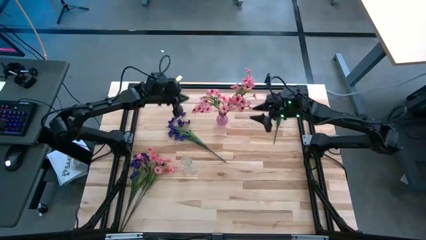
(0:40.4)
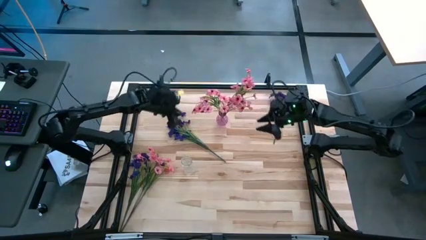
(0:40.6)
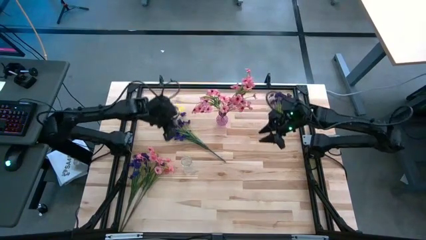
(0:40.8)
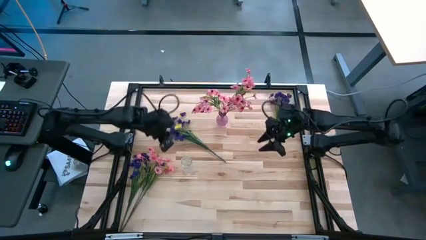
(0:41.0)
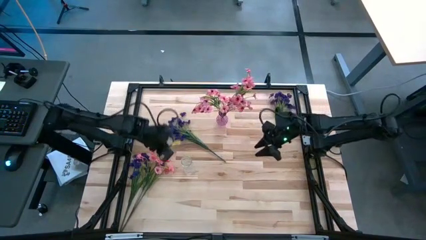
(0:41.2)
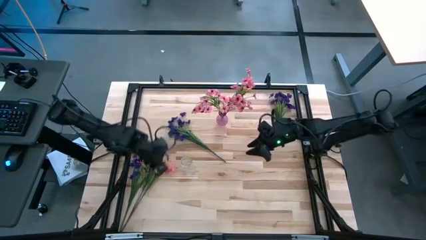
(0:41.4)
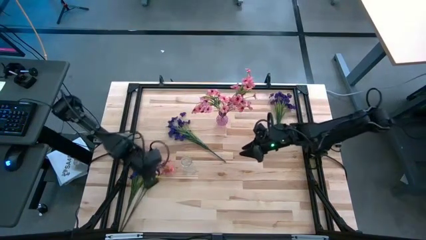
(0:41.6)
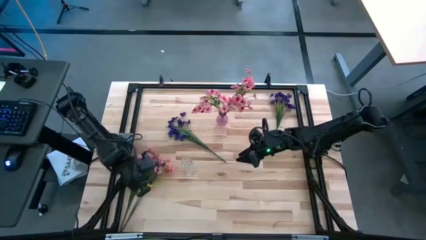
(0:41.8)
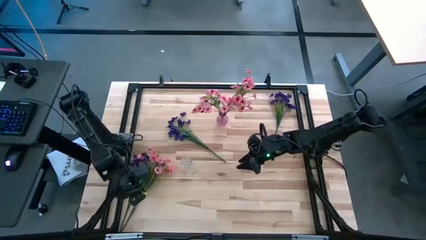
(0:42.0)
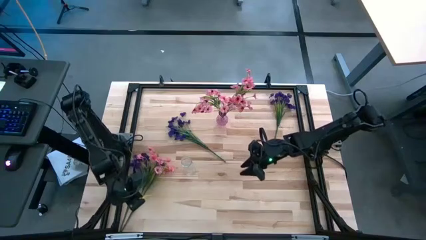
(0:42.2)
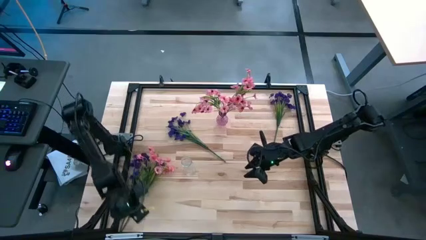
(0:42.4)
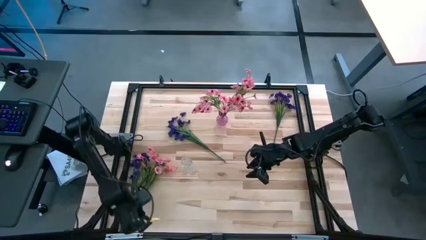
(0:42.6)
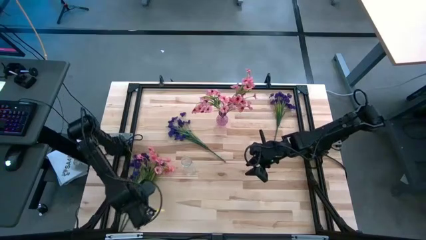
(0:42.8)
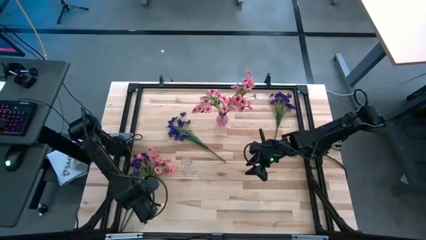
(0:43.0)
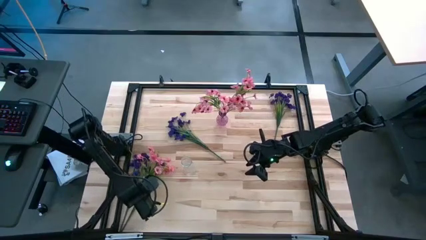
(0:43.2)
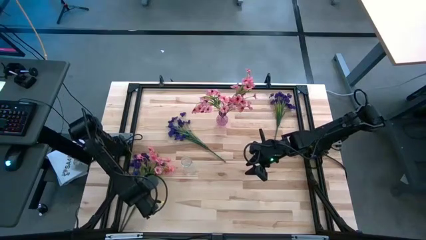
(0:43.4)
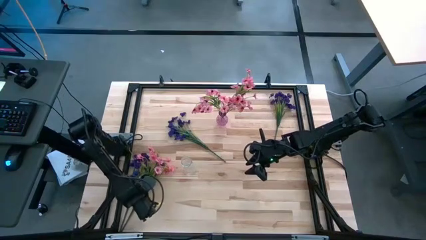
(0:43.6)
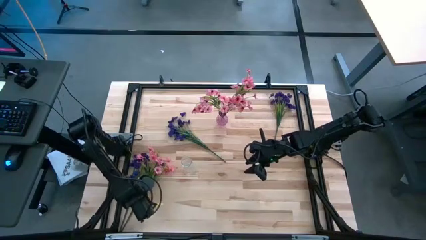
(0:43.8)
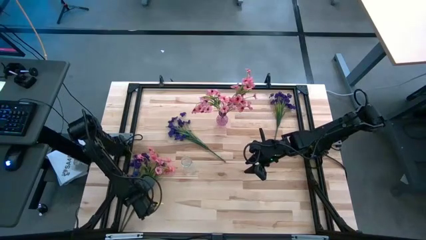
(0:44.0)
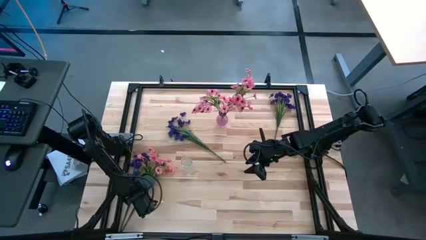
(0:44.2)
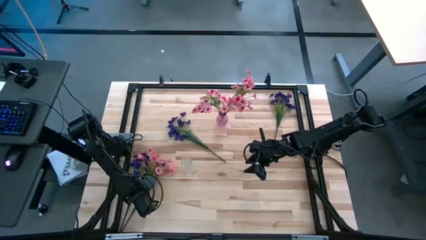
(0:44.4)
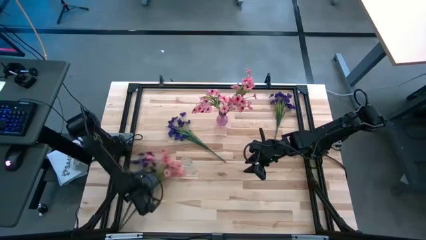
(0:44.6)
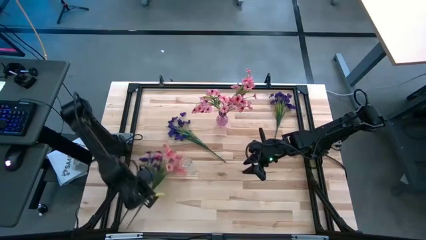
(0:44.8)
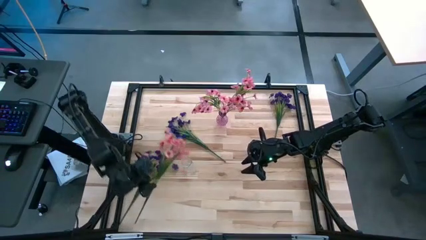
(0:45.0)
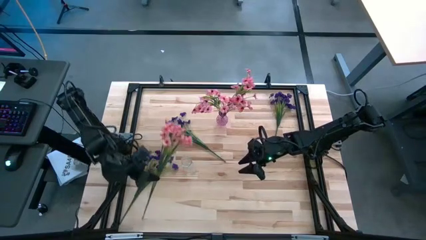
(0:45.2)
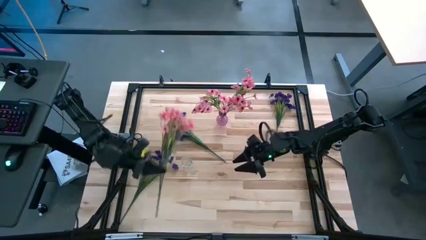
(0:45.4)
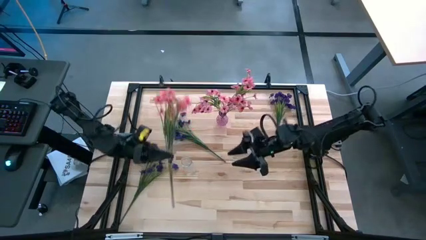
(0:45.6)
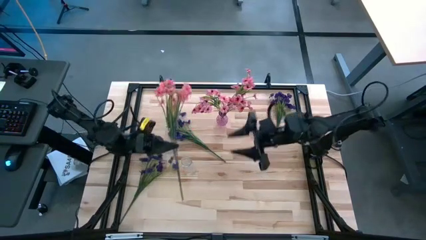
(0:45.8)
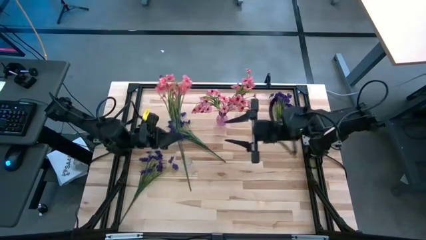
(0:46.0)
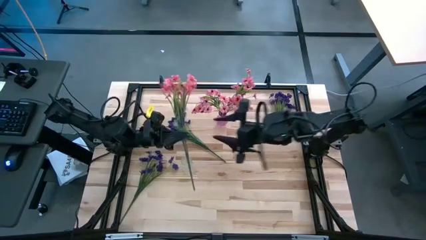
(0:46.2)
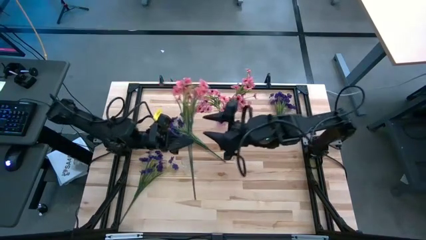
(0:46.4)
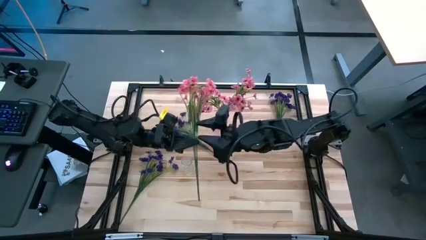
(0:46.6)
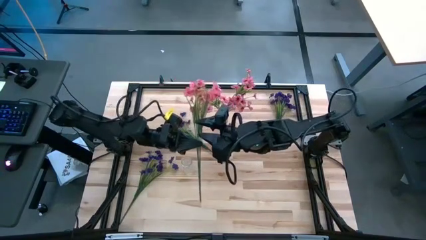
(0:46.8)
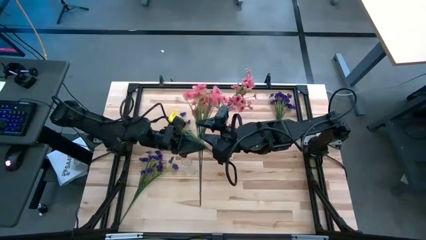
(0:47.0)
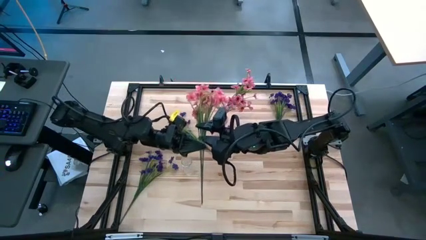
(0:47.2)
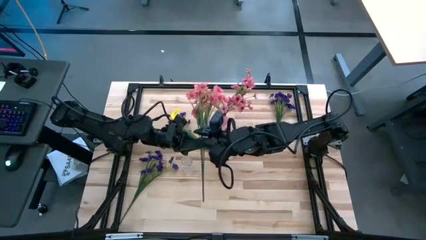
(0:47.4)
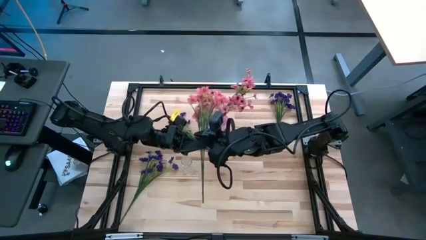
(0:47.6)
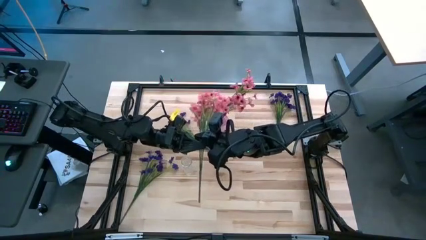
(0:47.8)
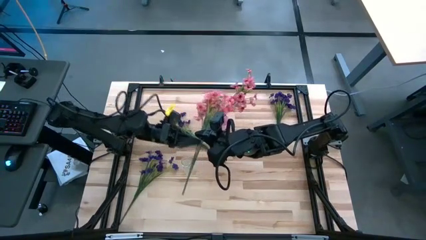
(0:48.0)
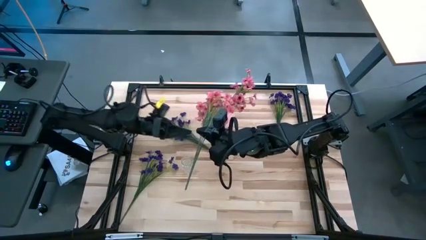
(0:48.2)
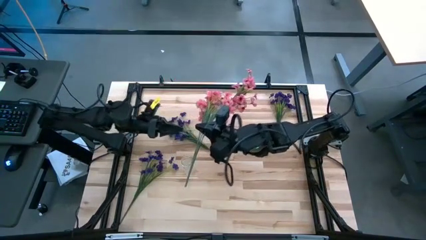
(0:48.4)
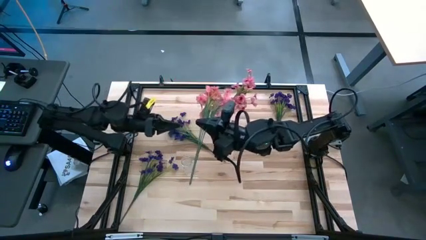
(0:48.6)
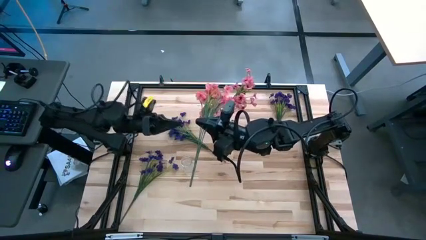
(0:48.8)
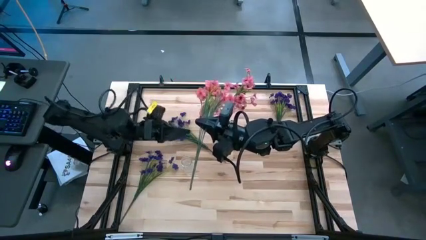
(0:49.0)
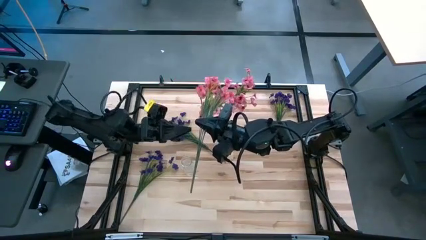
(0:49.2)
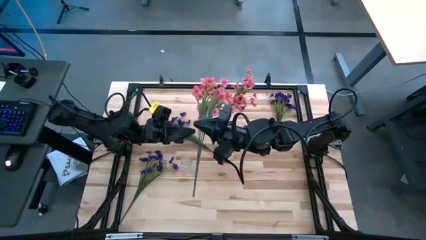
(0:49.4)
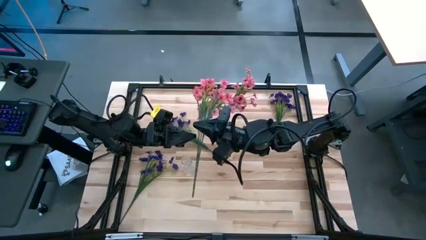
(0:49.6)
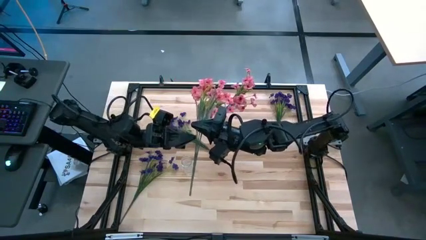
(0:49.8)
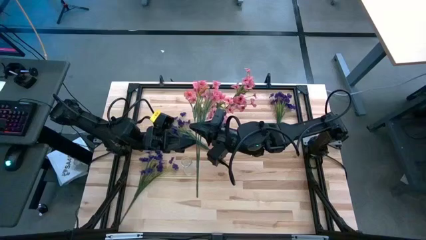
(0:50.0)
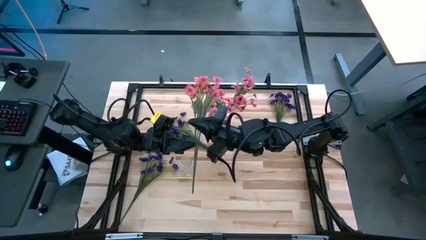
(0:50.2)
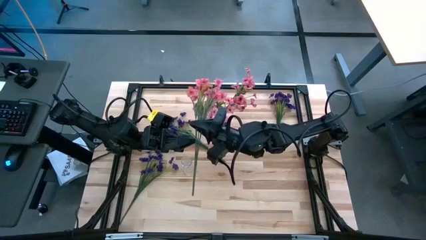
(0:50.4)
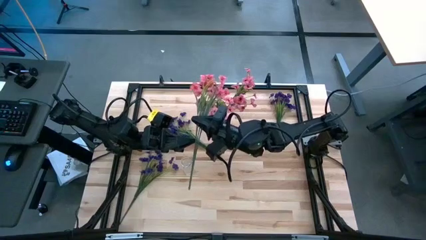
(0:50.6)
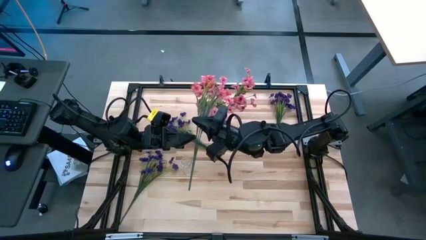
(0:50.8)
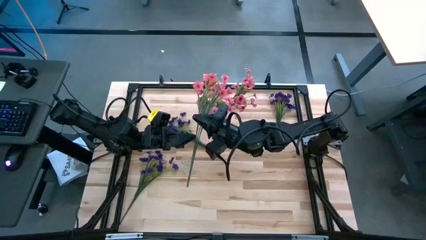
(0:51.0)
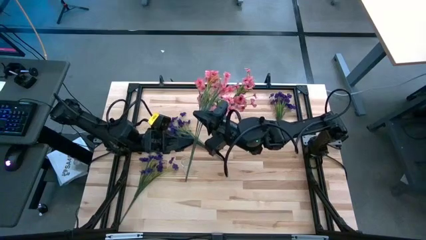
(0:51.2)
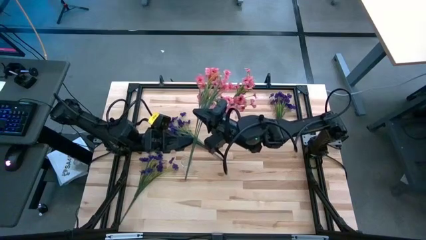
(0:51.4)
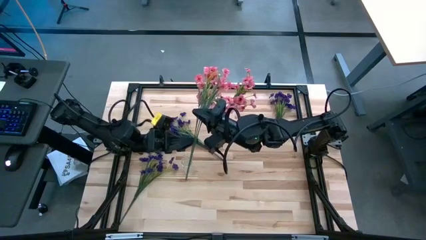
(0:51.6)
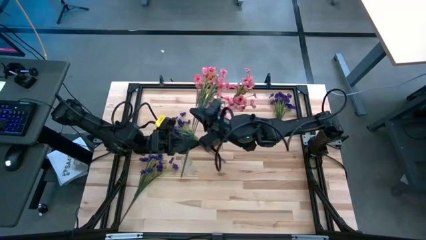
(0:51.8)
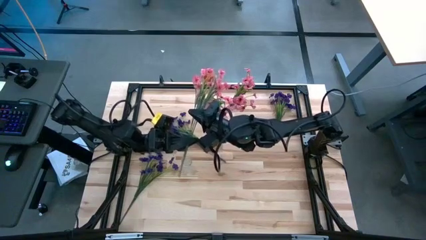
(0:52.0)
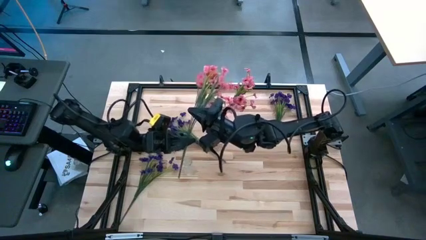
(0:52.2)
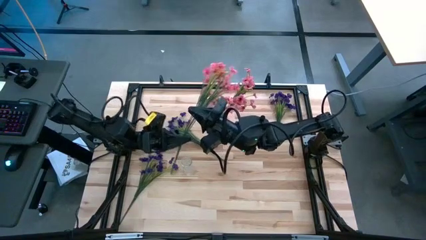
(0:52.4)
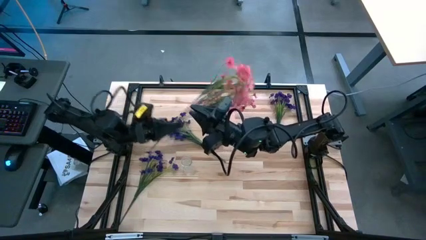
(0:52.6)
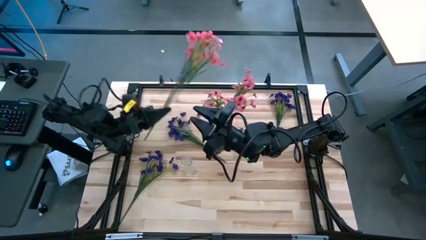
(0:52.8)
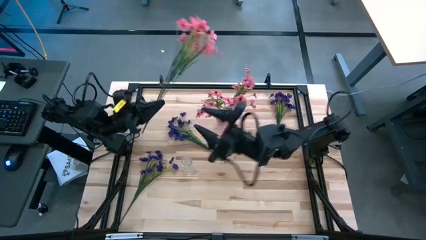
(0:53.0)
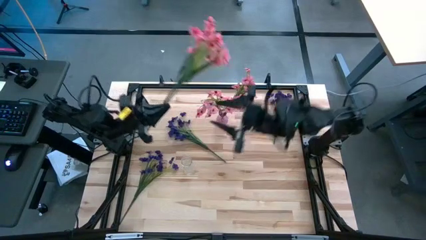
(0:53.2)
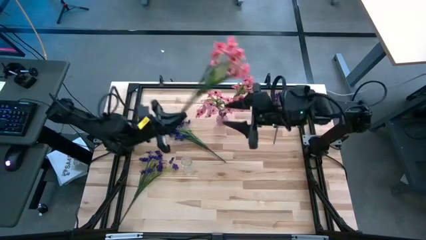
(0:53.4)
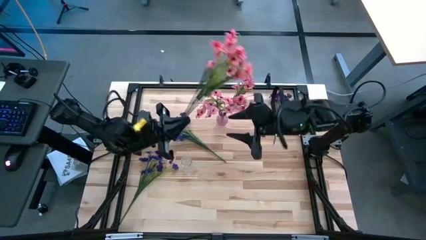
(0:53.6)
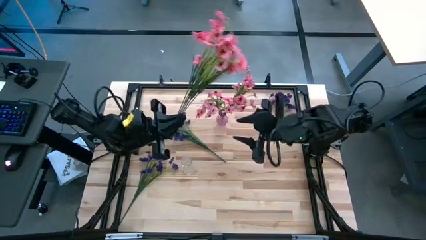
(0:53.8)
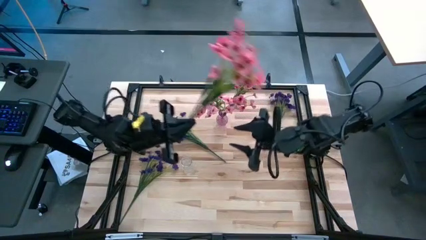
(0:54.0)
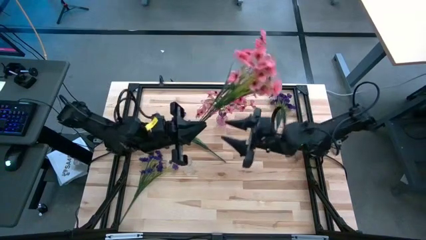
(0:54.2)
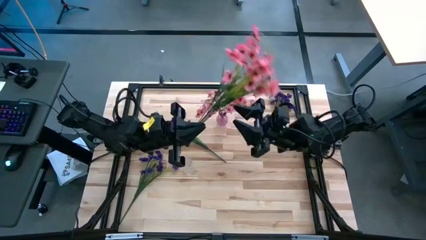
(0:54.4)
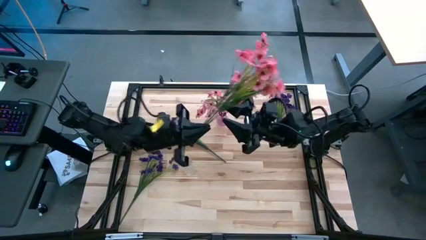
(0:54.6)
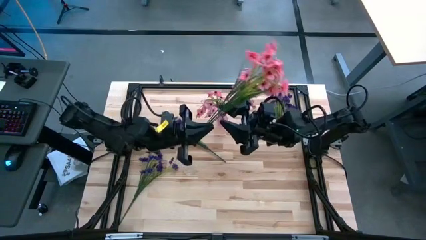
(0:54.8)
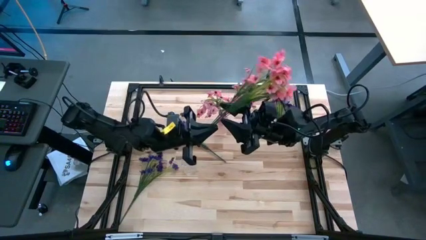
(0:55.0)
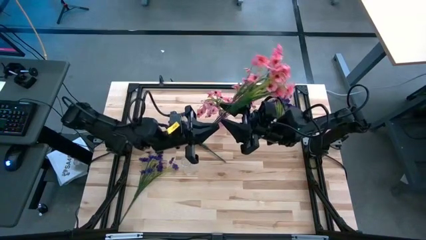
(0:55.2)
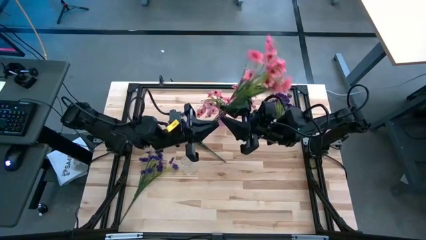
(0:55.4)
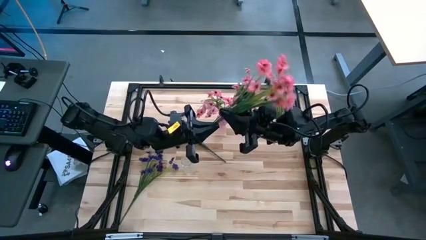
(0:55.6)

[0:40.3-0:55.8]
Task: Sort flowers into vase by color
Put the pink flowers into the purple vase

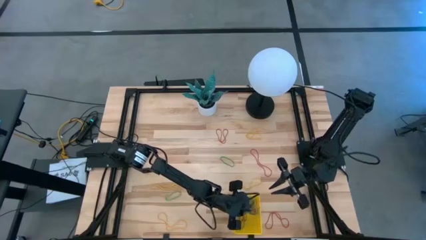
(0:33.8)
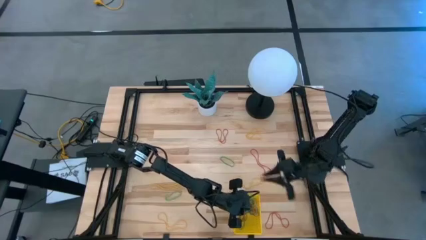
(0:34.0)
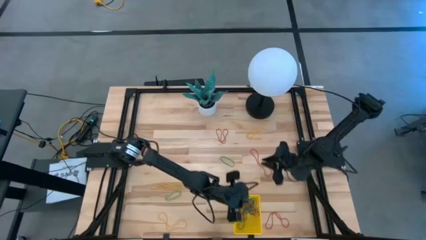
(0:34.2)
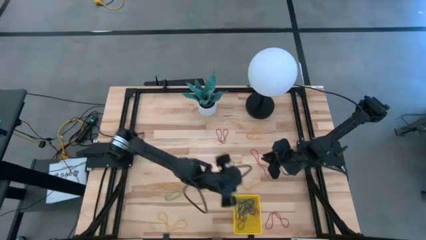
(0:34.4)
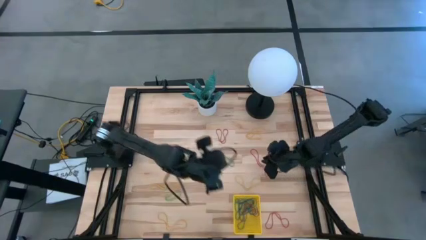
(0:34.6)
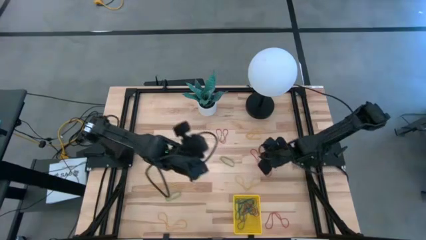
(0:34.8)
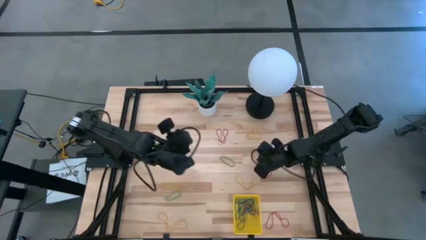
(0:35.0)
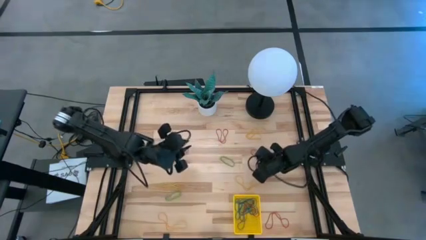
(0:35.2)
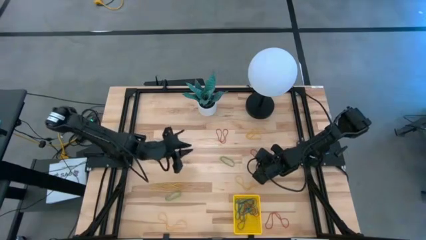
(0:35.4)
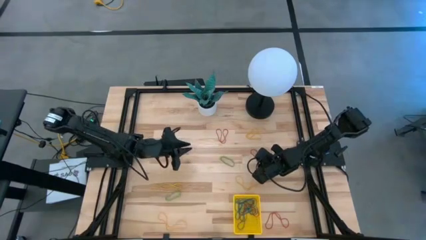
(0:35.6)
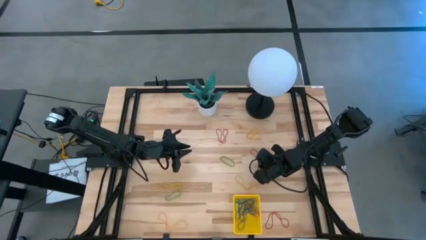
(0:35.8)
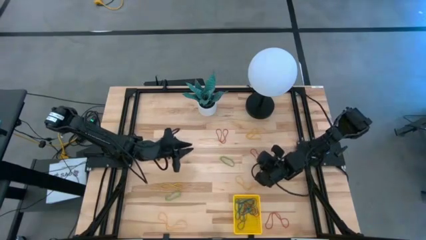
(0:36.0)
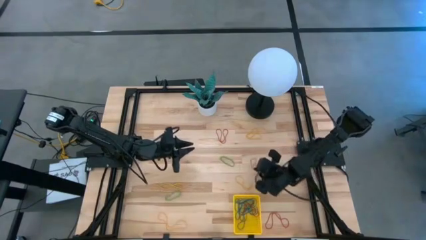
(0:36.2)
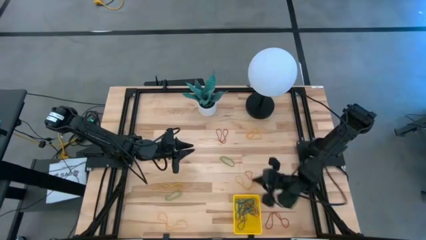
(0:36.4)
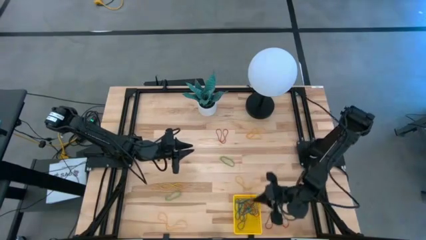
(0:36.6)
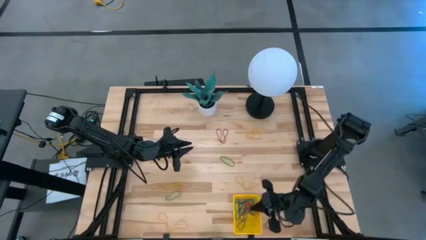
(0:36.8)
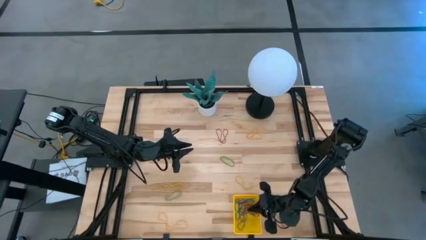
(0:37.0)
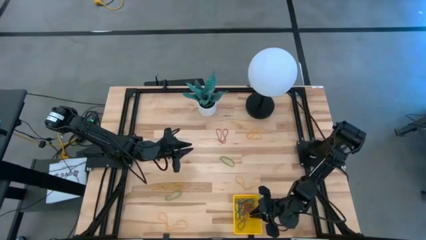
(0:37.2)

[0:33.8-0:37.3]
Task: Pick and place rubber bands into bin
Put the red rubber band into the yellow basket
